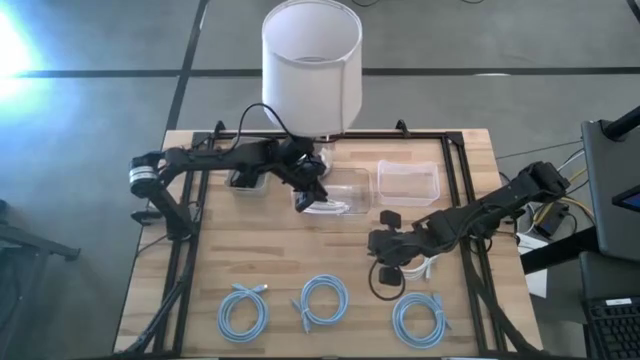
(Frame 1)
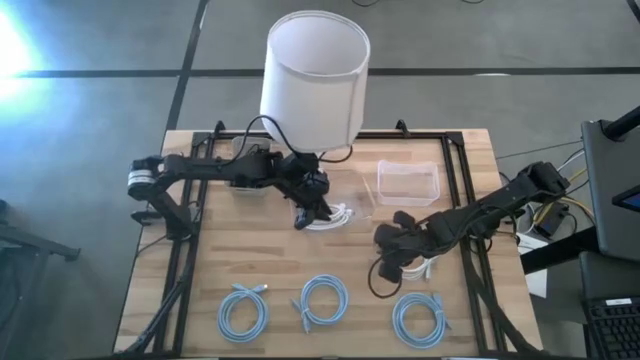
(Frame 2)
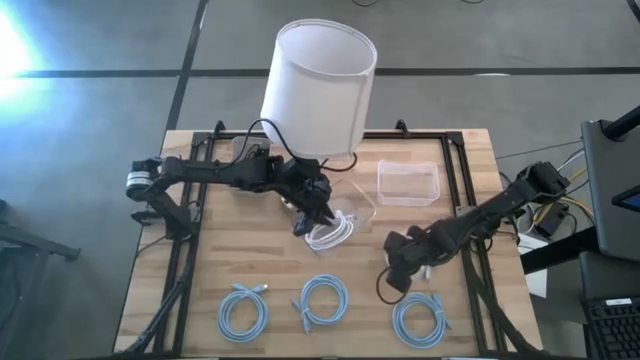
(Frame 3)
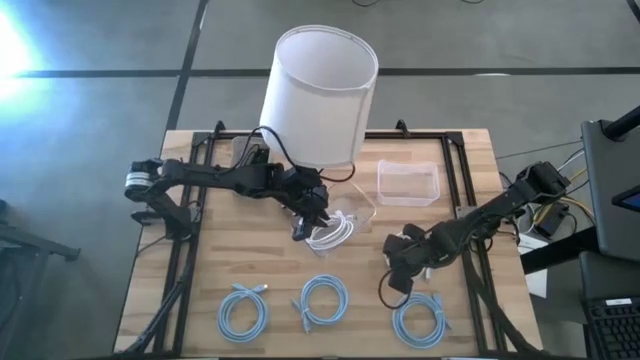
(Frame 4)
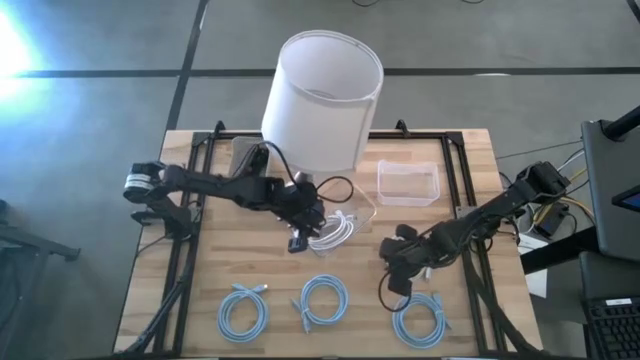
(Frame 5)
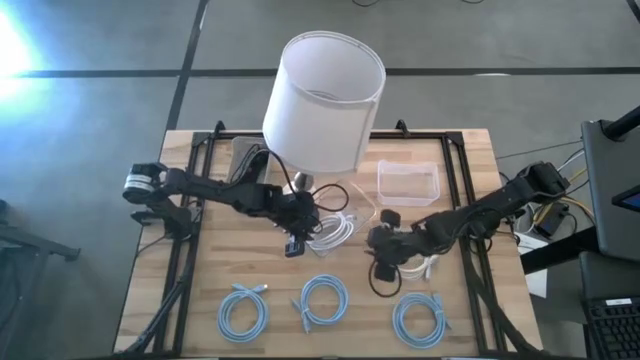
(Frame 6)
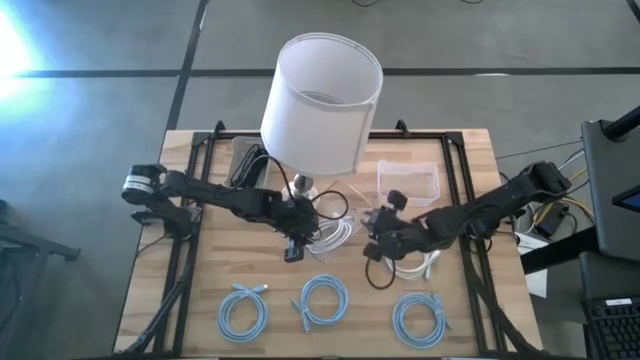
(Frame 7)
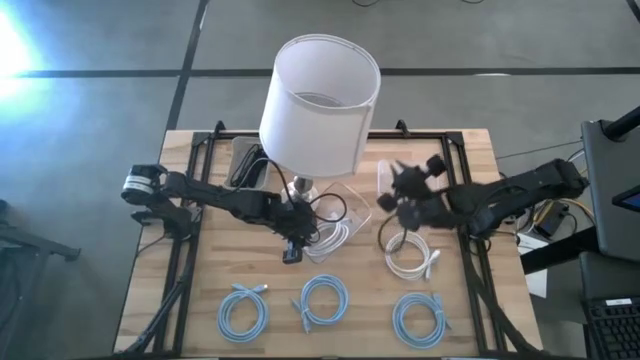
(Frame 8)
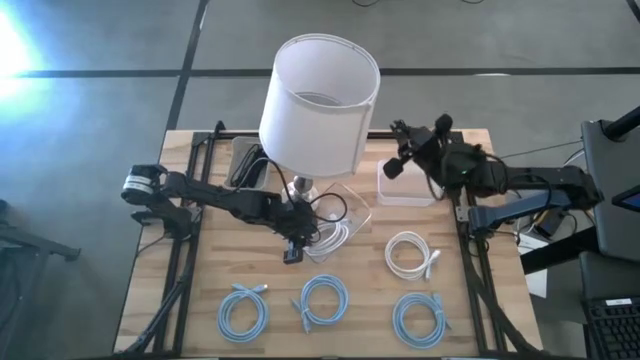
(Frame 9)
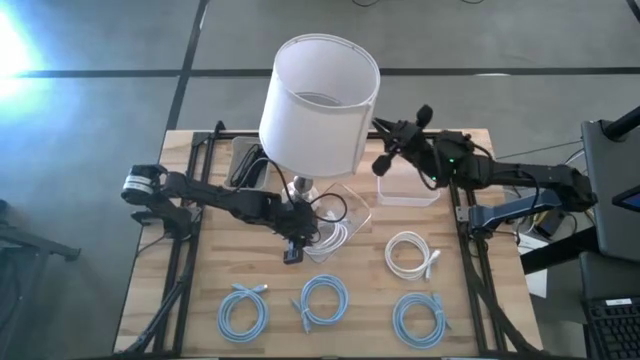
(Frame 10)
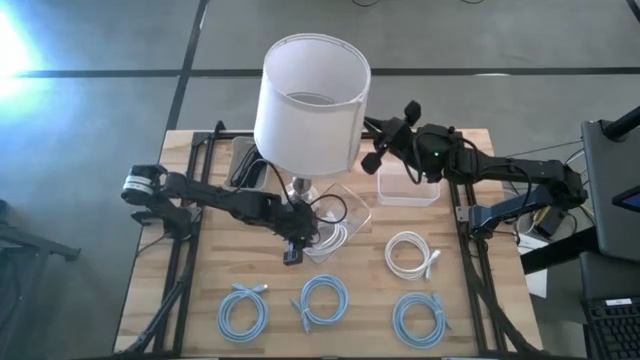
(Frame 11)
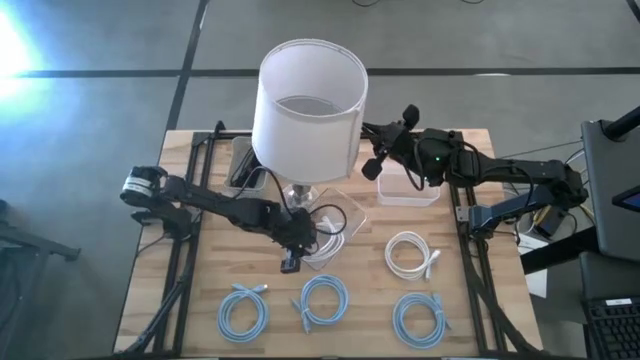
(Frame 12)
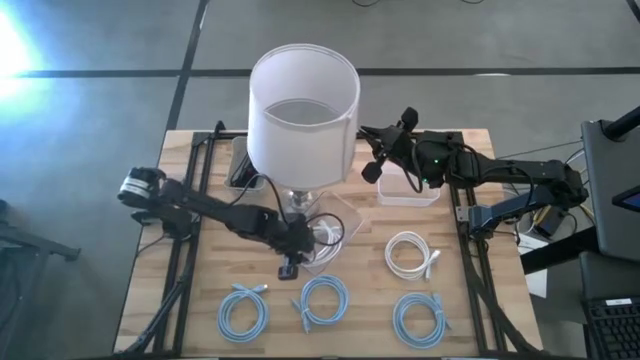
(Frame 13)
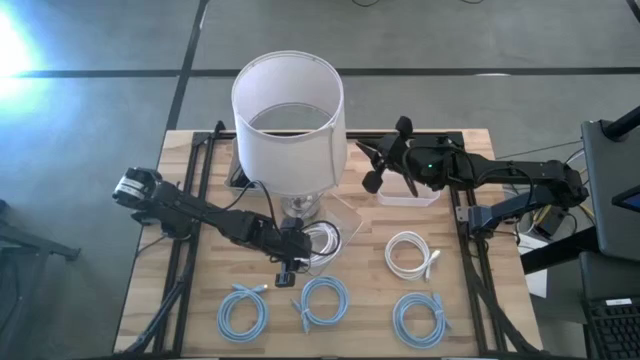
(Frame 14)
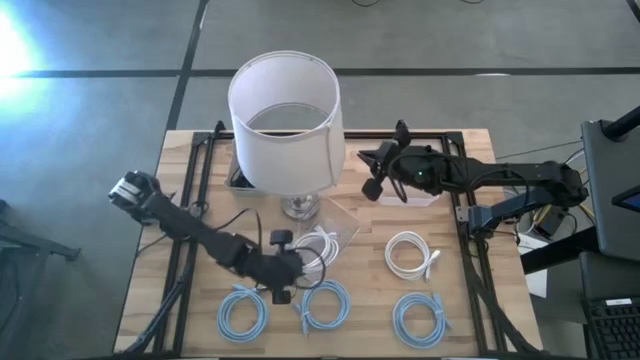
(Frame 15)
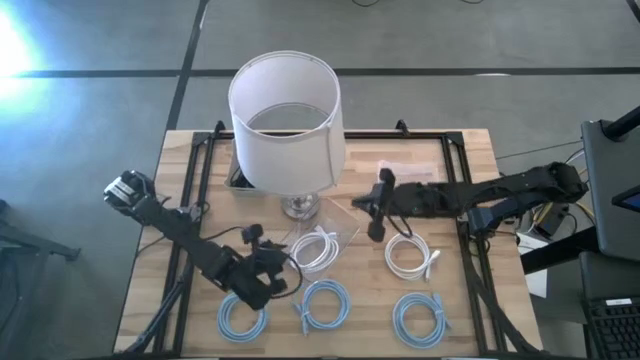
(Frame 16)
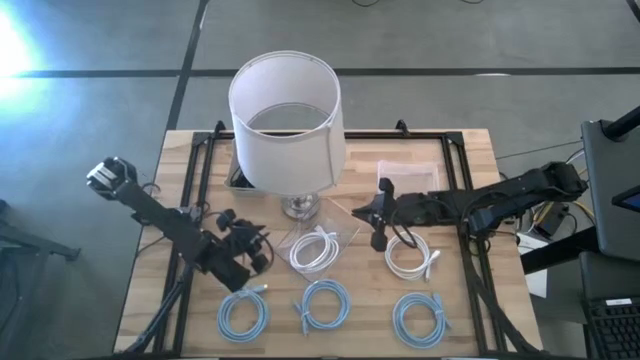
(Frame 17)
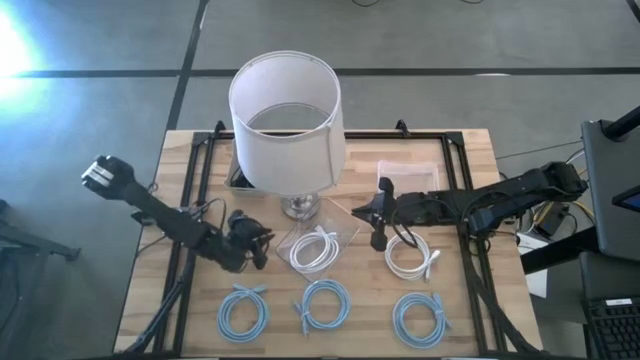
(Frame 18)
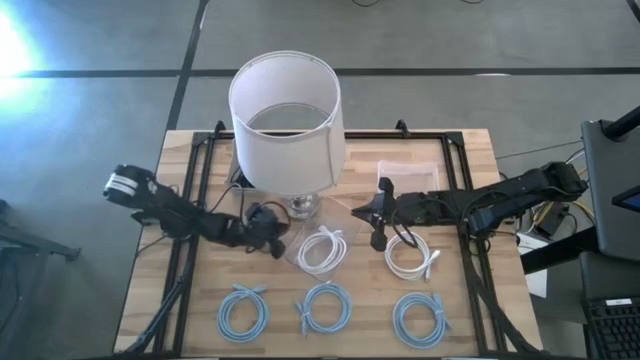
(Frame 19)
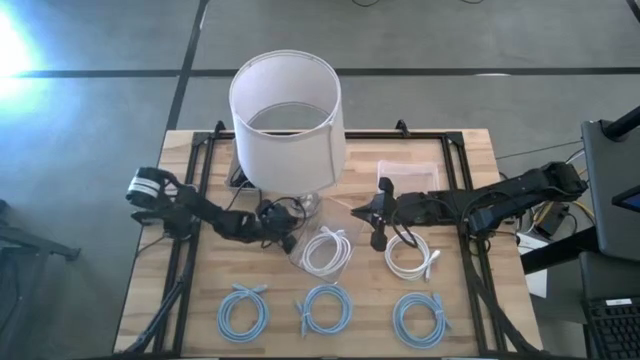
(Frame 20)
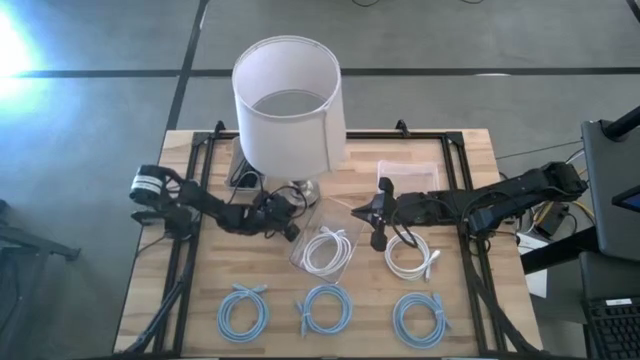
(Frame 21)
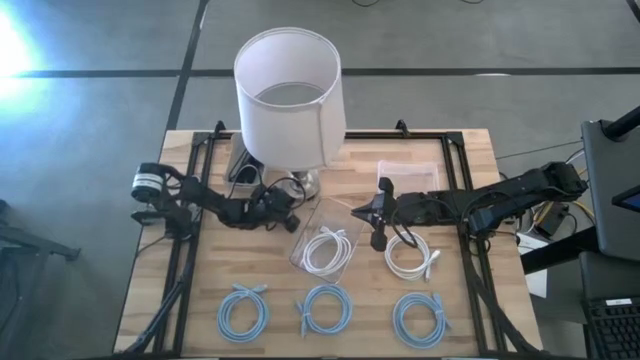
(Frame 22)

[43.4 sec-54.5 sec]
Task: Pick & Place USB Port
Adjust the lamp on the table

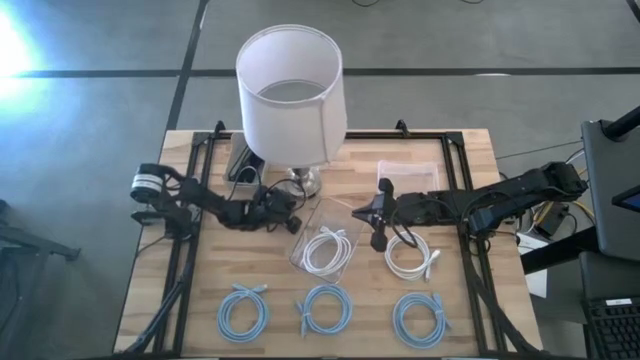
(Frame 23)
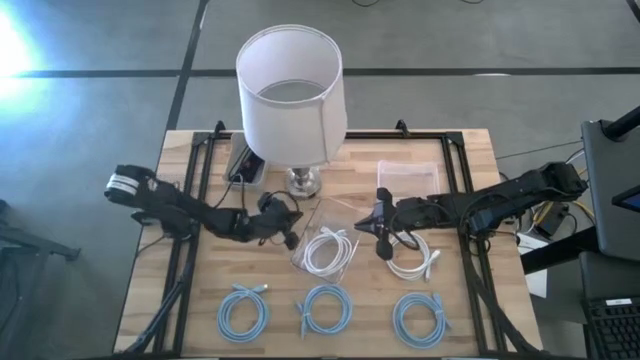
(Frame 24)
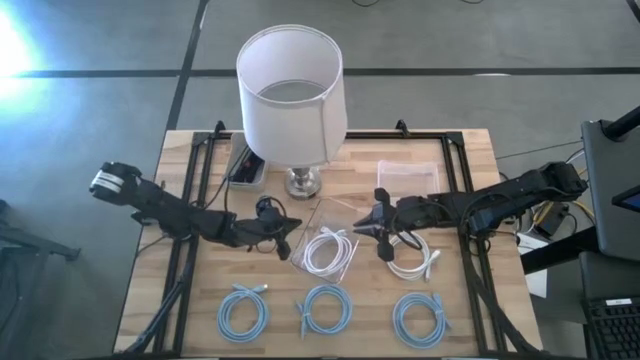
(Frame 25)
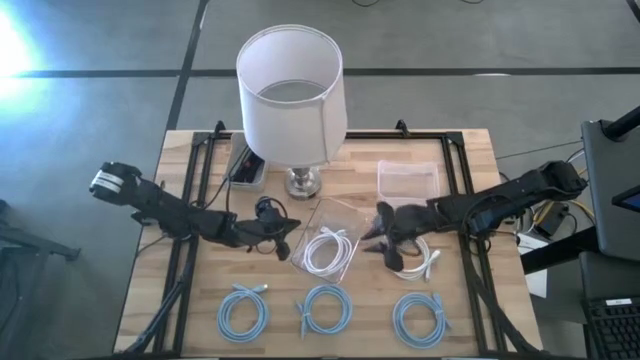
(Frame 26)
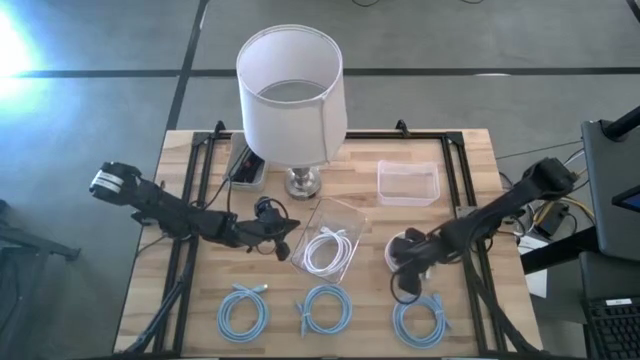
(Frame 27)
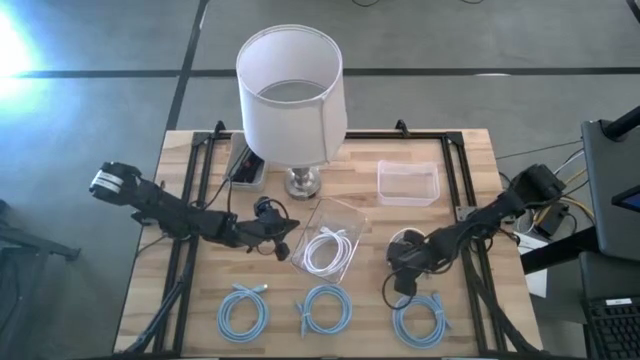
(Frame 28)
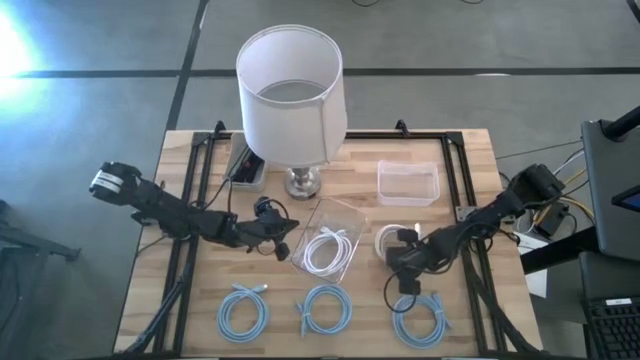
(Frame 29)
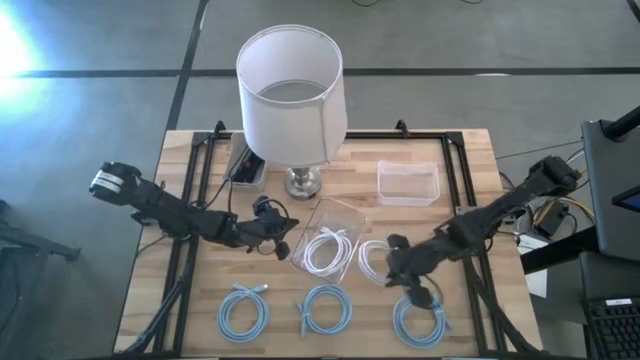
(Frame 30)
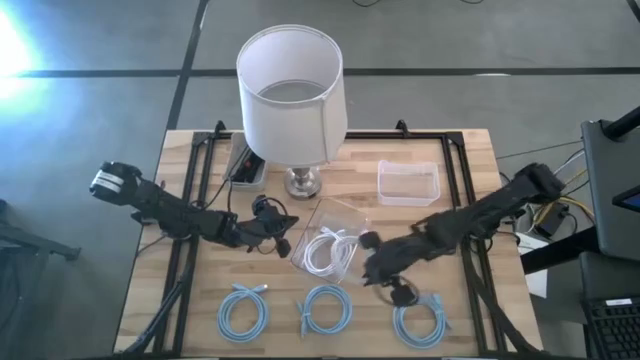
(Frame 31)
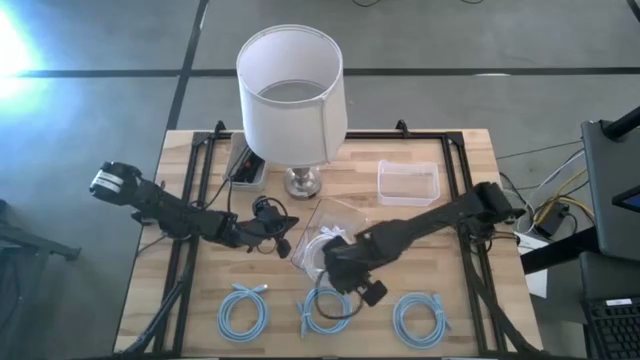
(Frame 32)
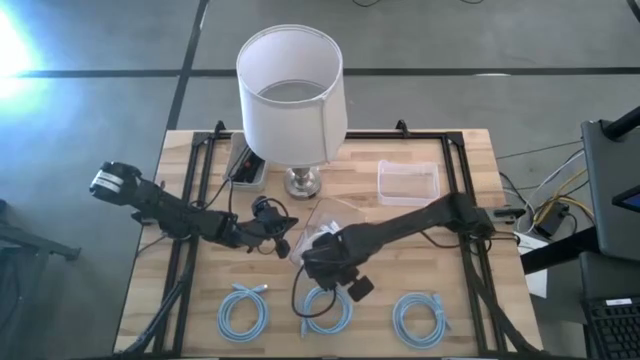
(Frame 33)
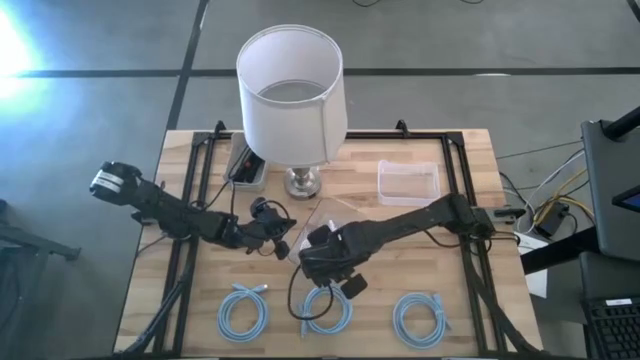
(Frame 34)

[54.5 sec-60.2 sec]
Put the white display cable into the transparent bin

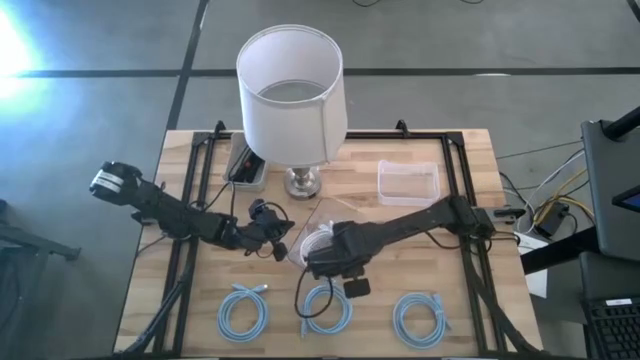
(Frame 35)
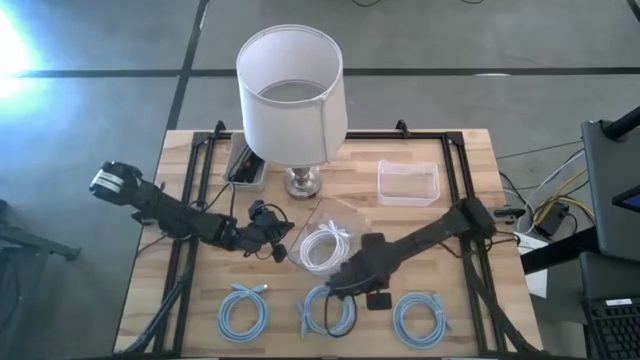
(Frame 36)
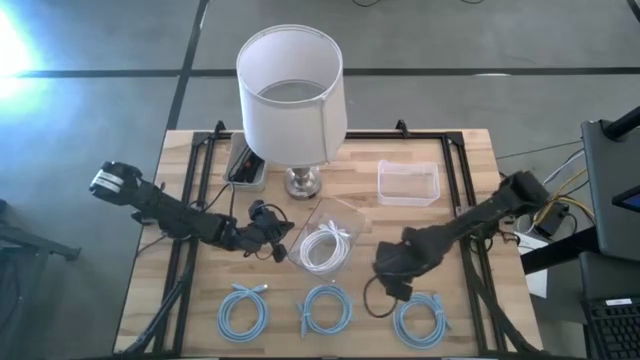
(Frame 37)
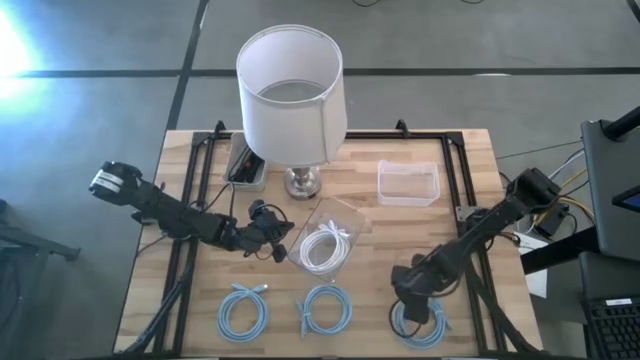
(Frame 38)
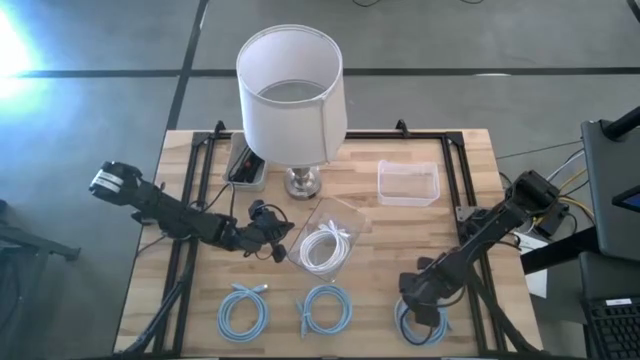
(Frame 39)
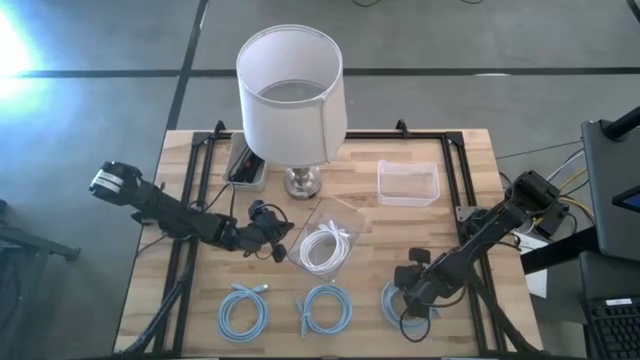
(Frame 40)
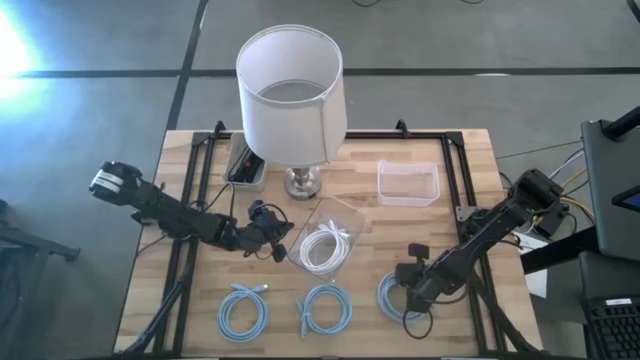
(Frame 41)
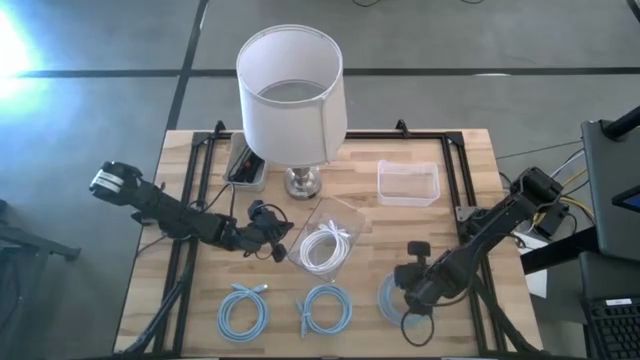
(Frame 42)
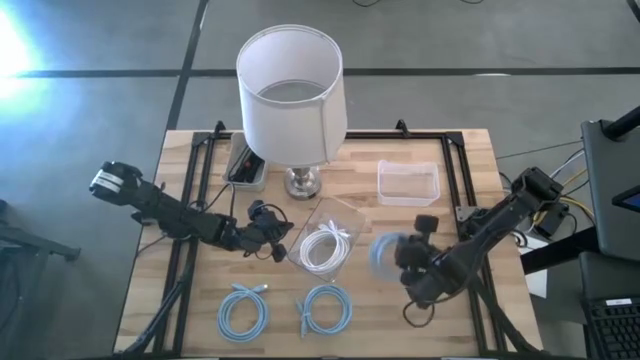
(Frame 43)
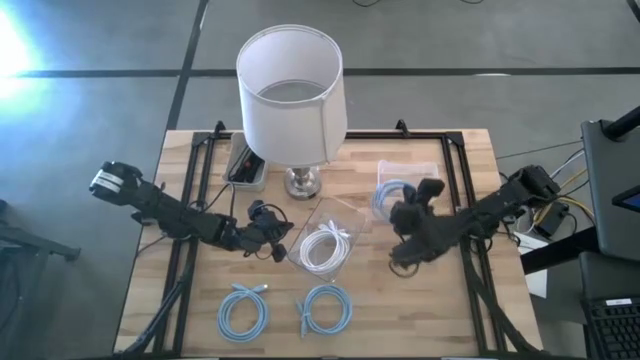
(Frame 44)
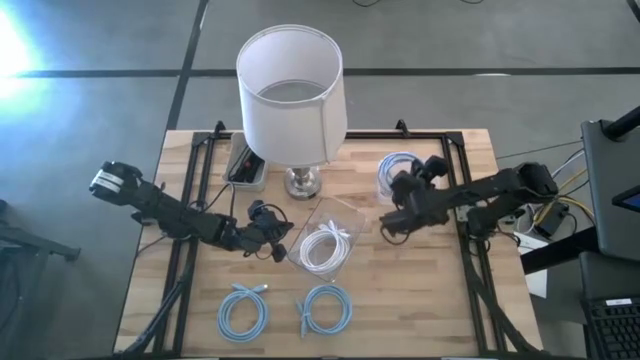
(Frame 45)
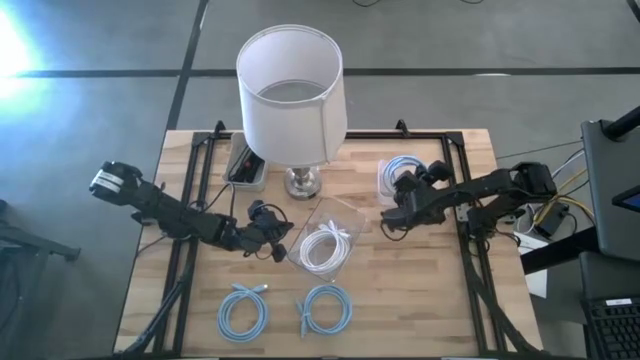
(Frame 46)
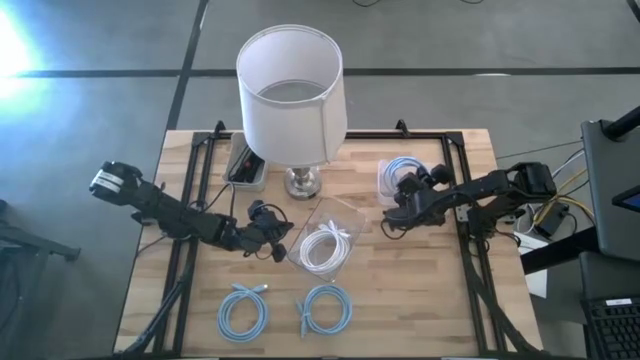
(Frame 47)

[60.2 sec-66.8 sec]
Put the right blue display cable into the white bin
